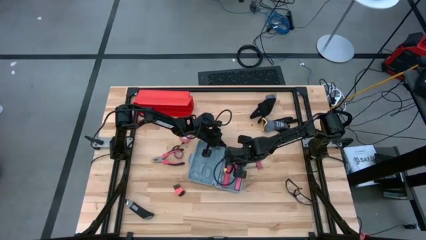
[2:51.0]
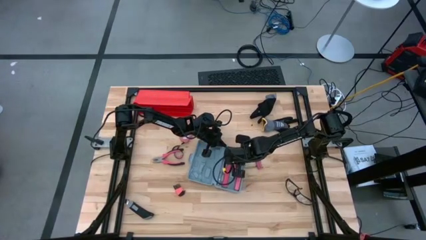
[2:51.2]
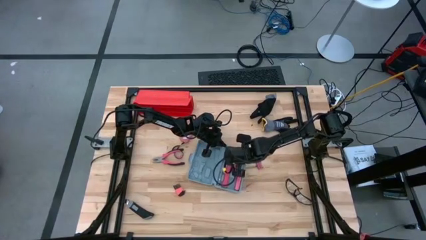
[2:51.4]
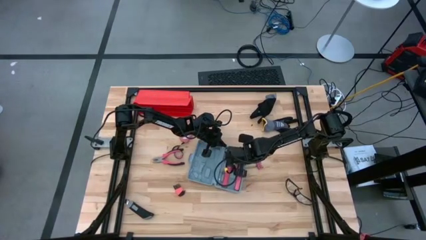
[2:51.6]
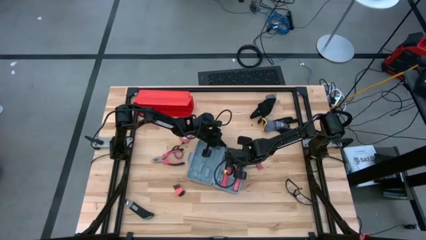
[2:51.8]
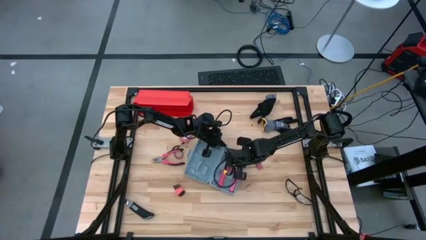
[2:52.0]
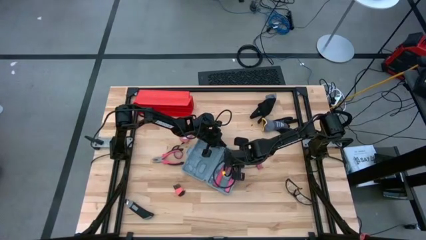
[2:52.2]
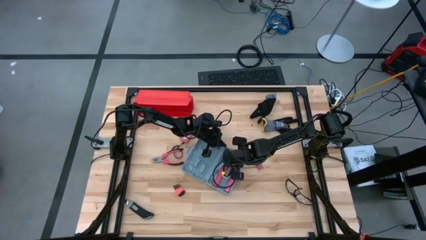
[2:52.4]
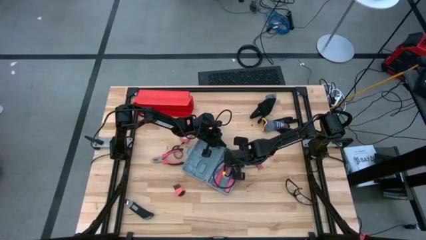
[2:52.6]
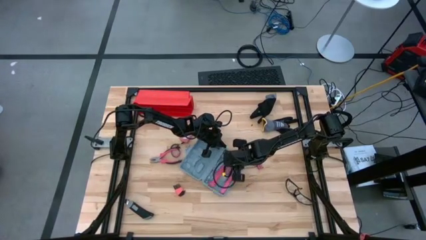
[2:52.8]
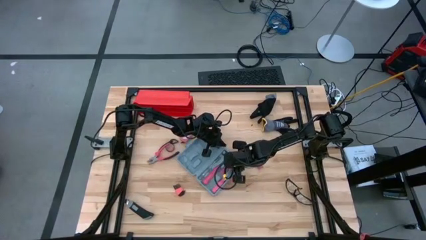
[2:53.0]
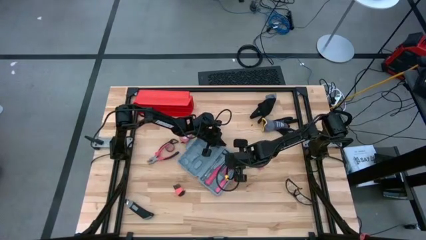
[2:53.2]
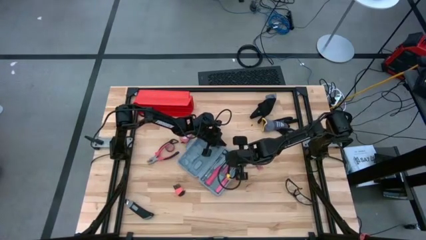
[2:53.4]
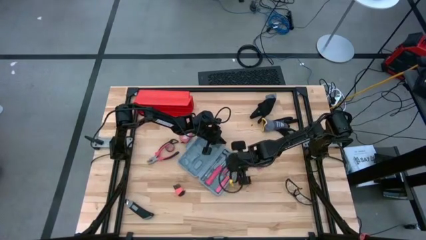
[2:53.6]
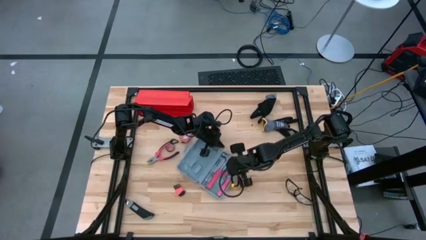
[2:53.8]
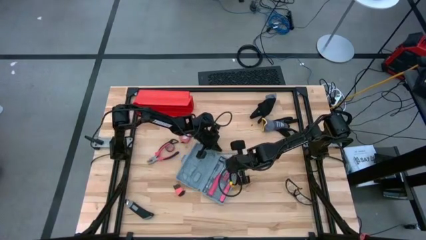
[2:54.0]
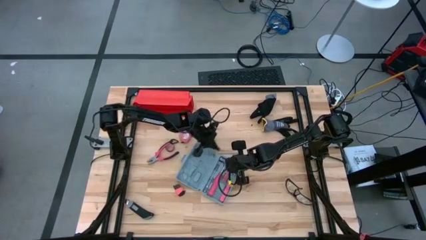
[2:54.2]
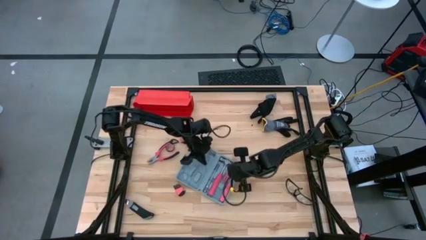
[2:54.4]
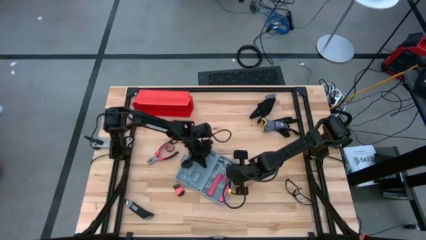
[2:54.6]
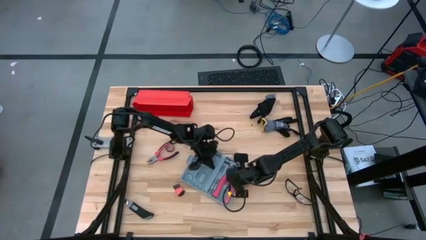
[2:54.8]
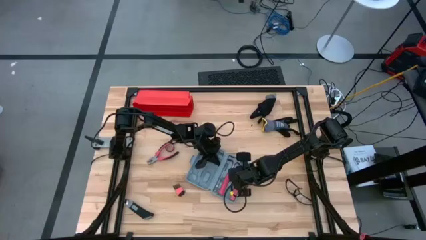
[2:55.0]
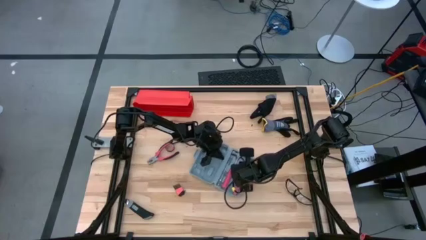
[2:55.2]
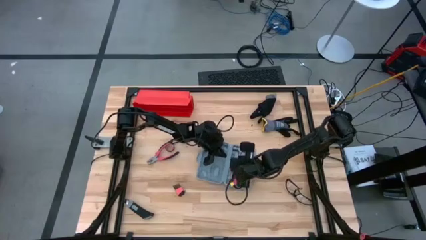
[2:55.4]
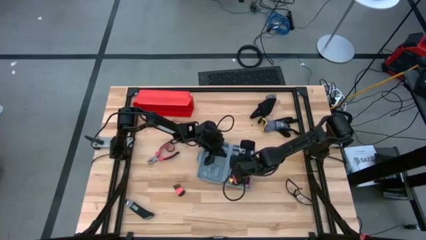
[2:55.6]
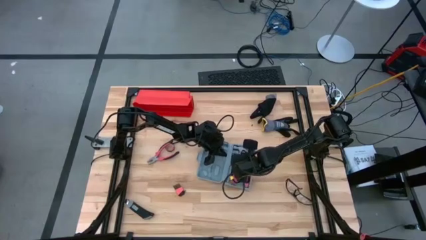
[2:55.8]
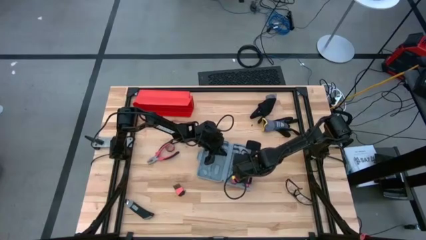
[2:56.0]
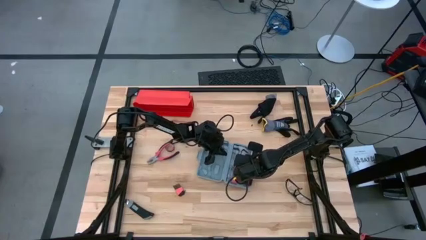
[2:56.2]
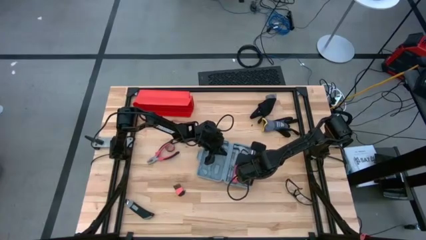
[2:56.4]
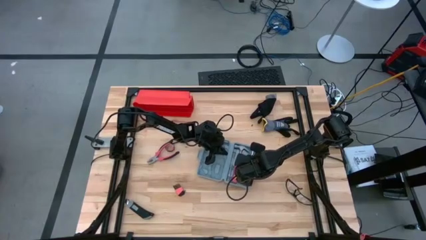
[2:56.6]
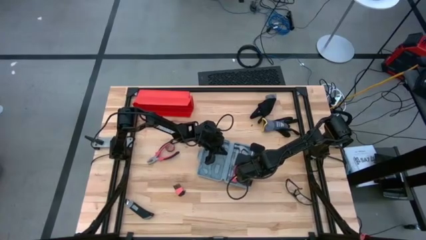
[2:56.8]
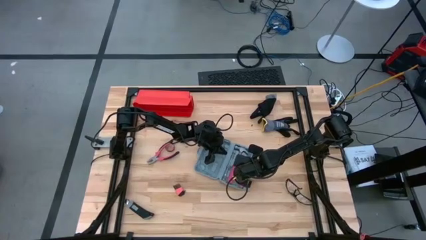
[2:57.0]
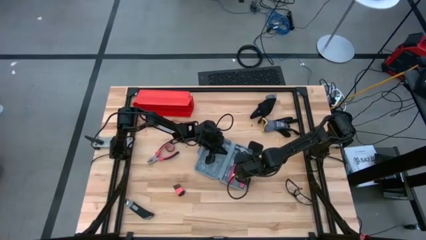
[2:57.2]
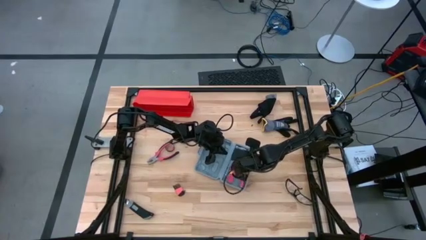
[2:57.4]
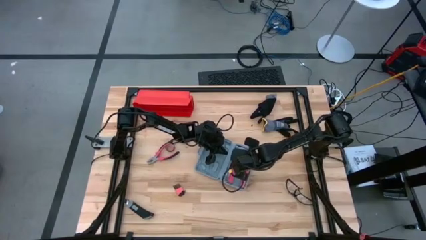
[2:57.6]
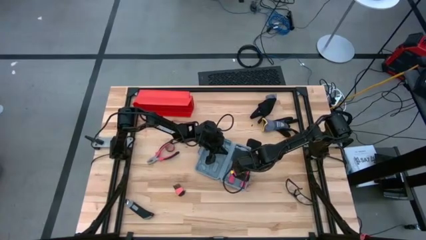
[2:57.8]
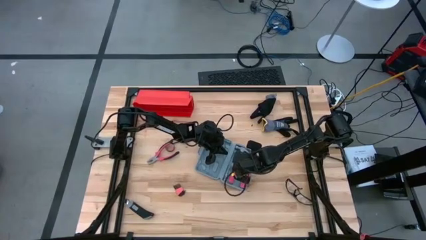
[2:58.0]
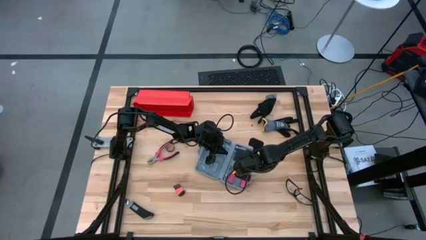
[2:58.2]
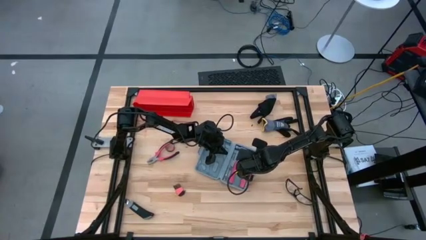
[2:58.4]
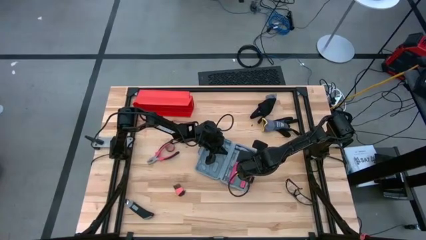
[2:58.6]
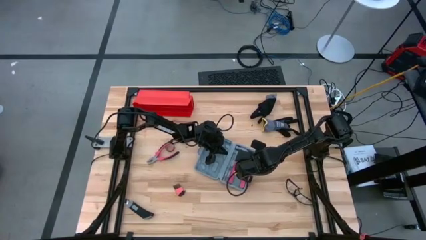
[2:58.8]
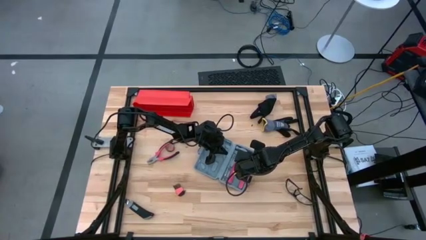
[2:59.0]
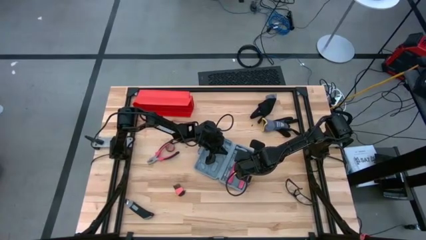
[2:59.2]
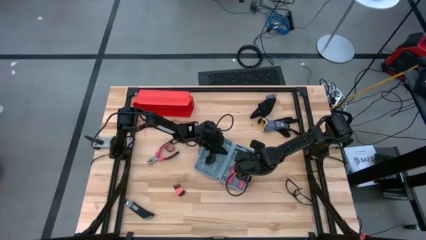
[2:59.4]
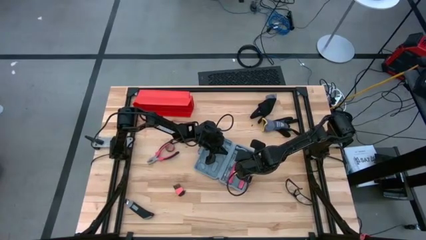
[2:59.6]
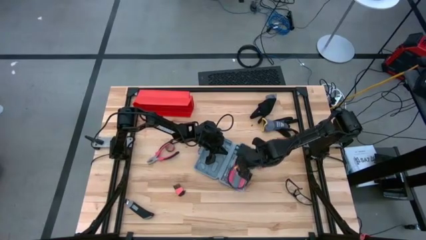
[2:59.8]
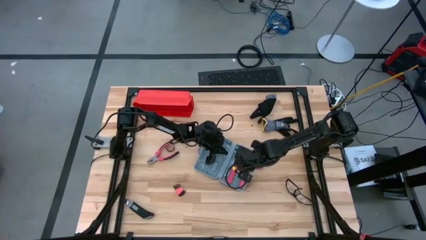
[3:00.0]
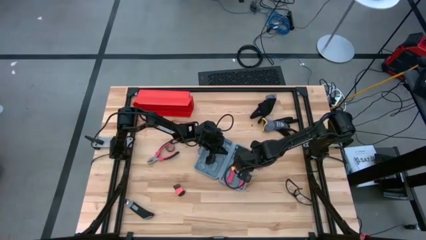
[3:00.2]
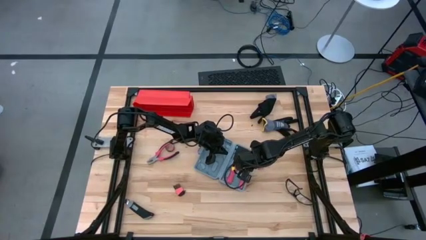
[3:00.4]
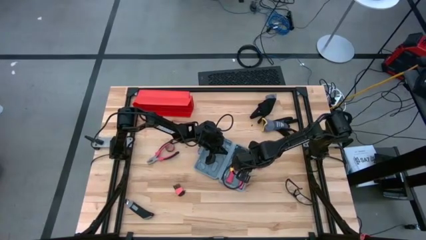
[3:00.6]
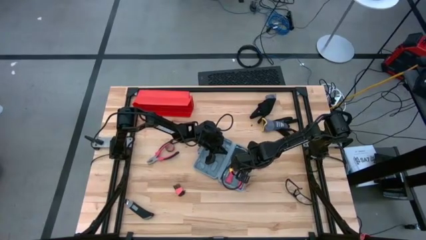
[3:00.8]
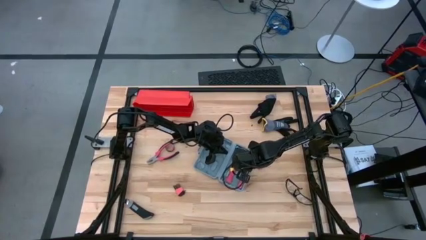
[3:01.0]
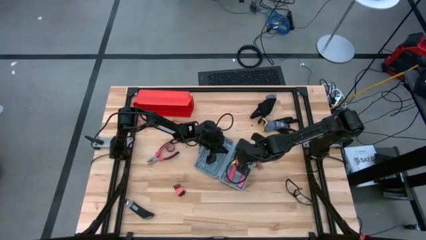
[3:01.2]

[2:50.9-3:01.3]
Task: prefit tool cases
Put the screwdriver bit holder in the gray pre-fit tool case

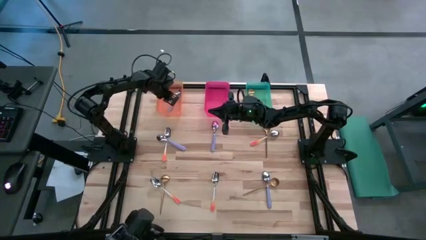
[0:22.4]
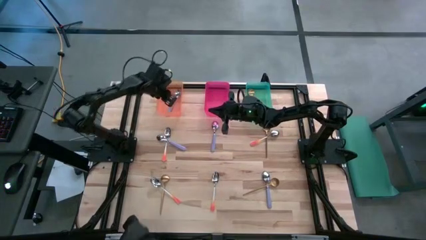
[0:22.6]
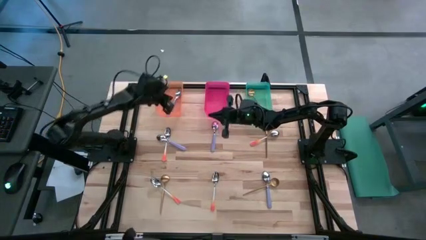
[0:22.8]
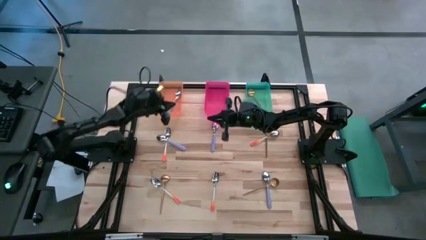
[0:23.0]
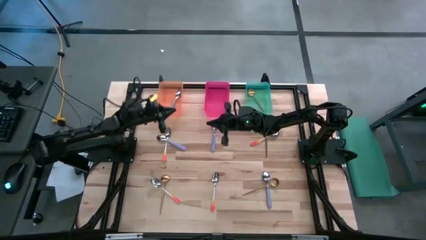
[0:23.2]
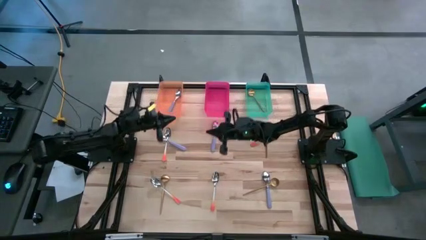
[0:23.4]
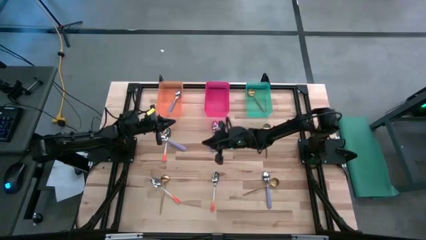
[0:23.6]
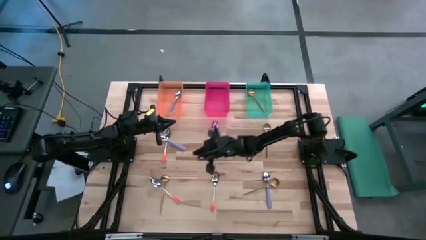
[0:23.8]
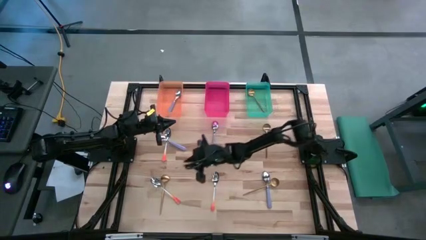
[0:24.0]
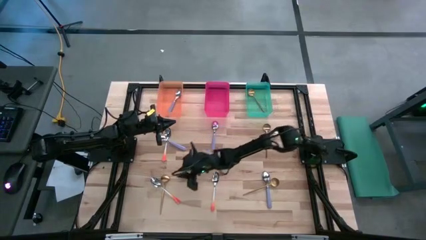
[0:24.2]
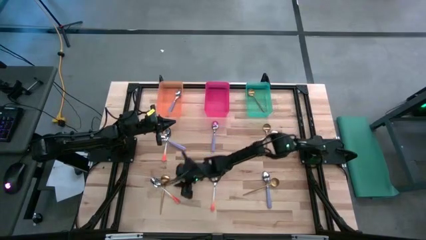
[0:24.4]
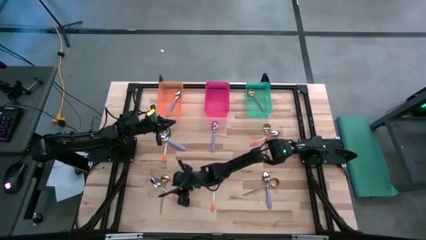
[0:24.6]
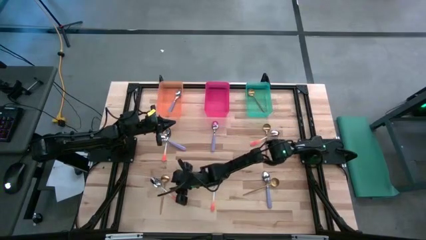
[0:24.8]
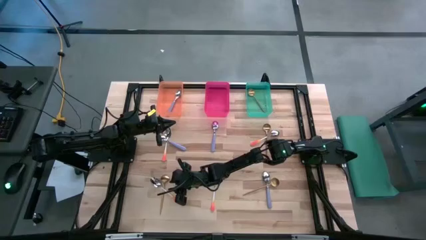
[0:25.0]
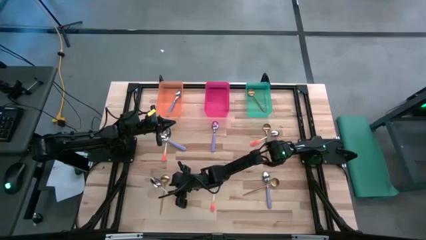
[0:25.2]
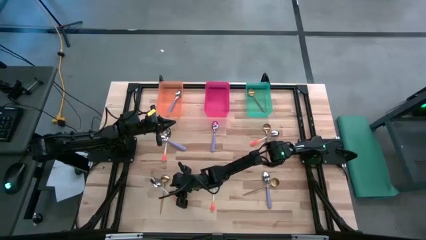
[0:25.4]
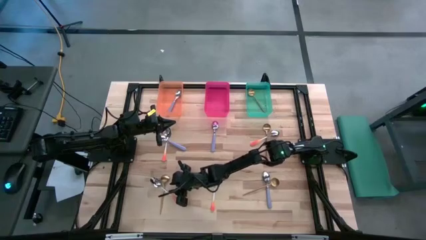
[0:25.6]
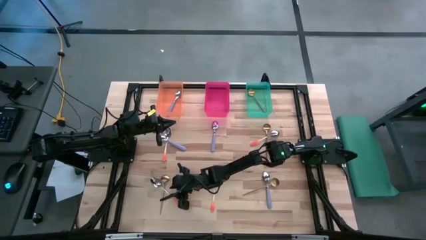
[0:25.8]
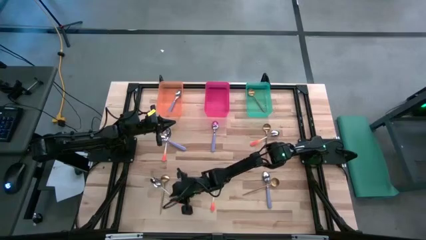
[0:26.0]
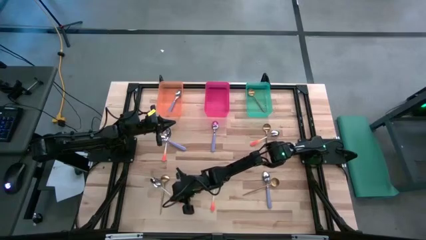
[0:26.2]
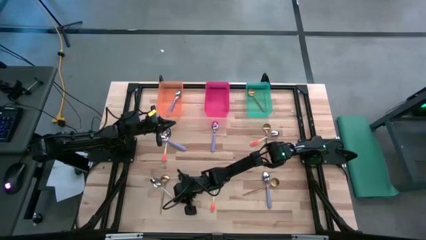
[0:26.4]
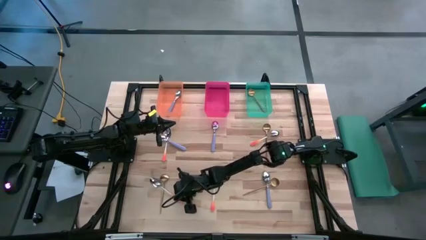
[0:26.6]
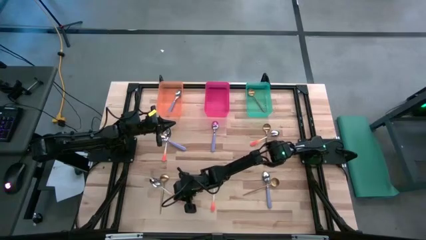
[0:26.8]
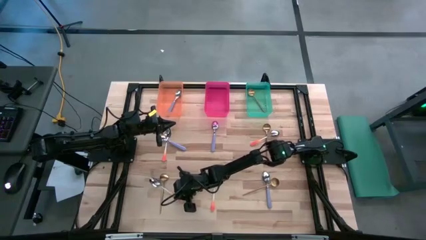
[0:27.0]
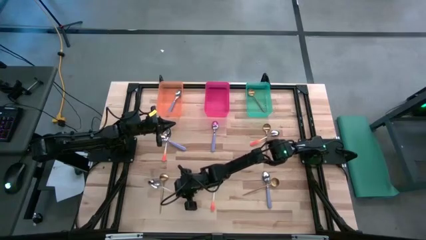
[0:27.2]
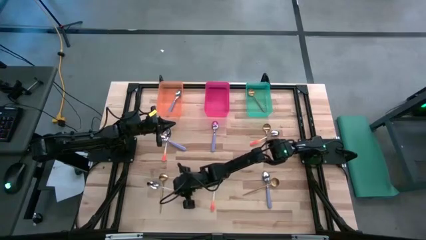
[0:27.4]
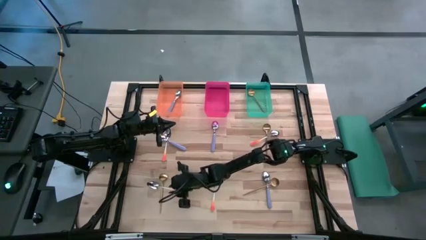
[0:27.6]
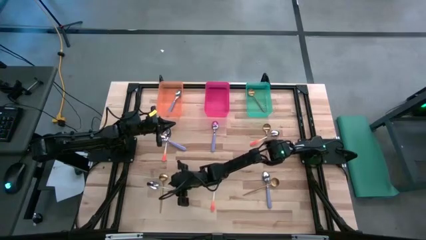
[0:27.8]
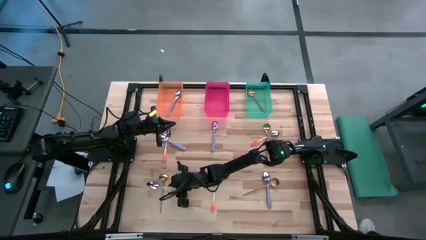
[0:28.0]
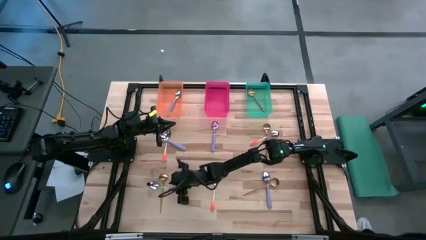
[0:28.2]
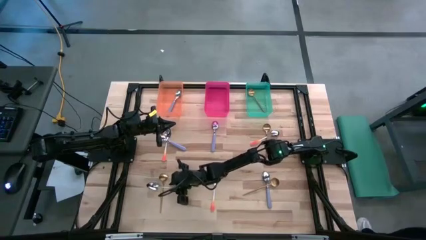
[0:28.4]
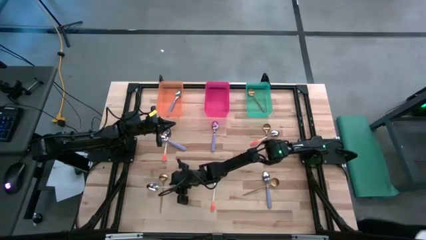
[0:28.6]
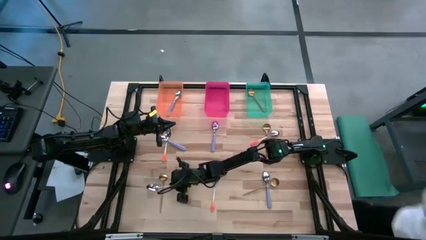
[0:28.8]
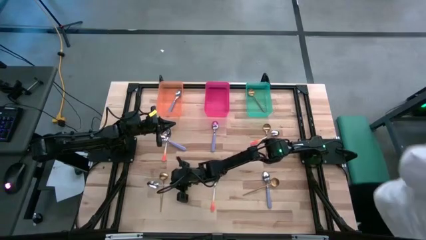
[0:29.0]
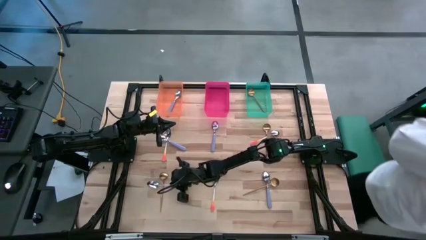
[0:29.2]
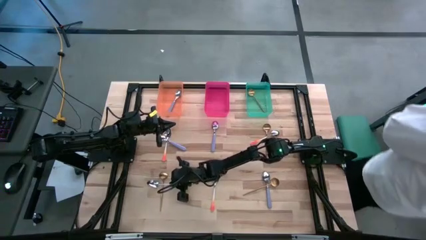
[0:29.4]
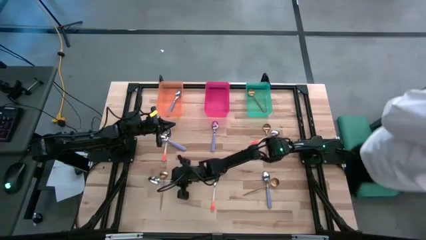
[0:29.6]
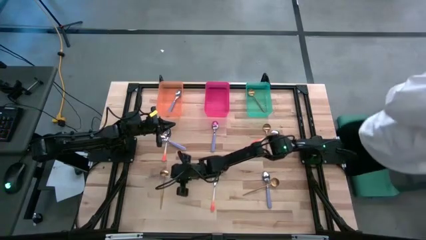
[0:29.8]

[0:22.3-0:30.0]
Task: Sort silverware by color (type)
Put the orange spoon into the pink bin
